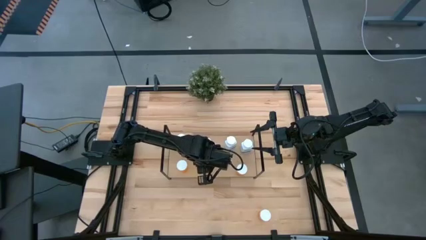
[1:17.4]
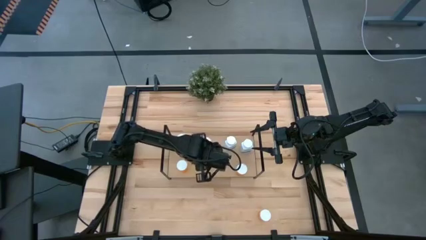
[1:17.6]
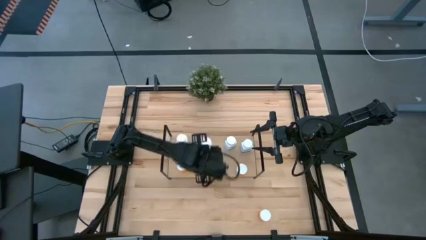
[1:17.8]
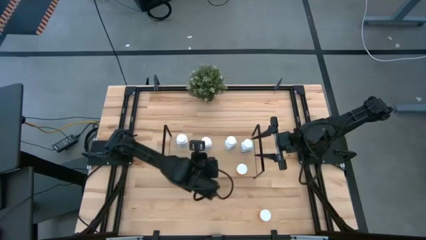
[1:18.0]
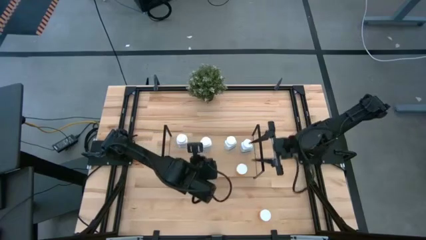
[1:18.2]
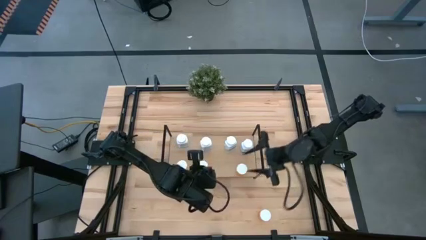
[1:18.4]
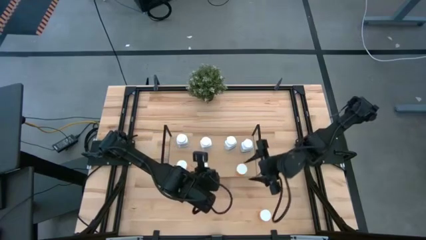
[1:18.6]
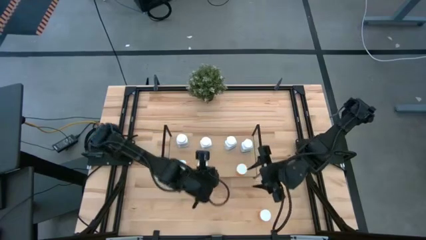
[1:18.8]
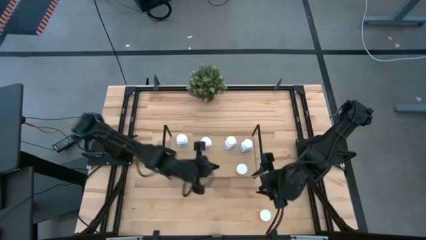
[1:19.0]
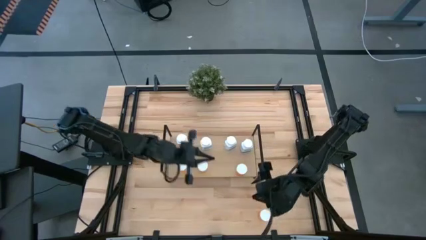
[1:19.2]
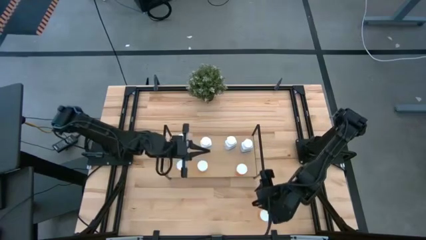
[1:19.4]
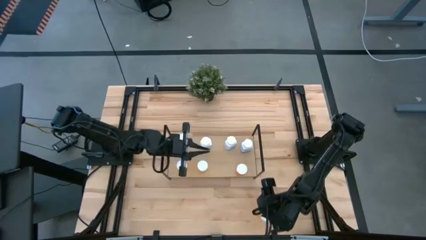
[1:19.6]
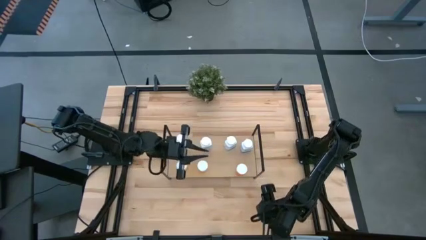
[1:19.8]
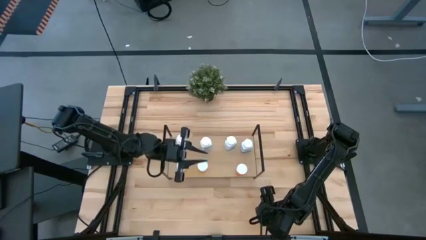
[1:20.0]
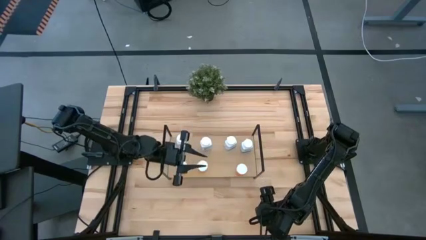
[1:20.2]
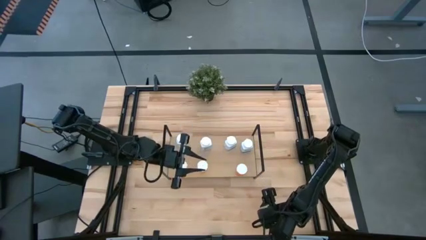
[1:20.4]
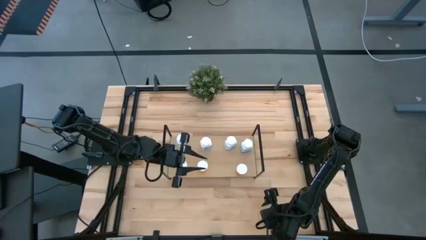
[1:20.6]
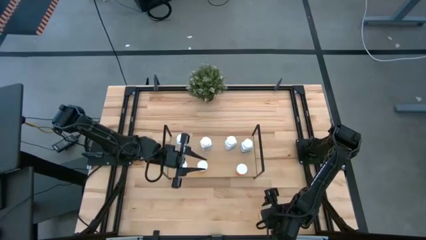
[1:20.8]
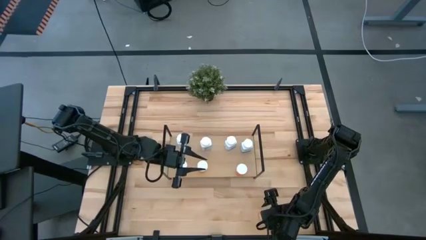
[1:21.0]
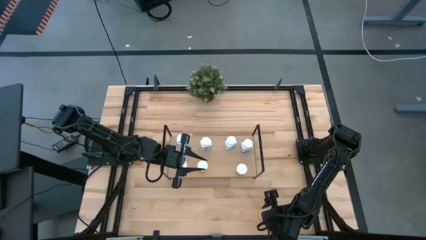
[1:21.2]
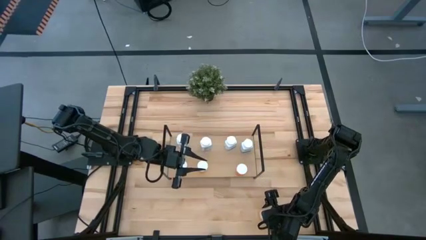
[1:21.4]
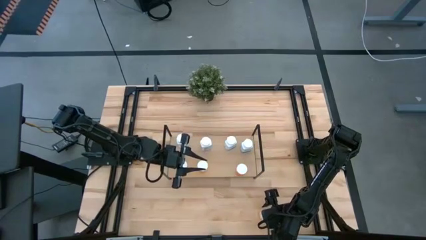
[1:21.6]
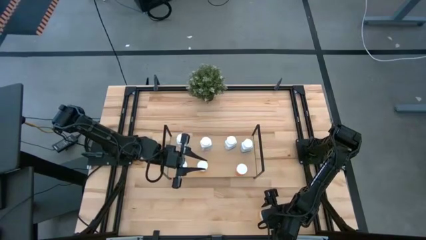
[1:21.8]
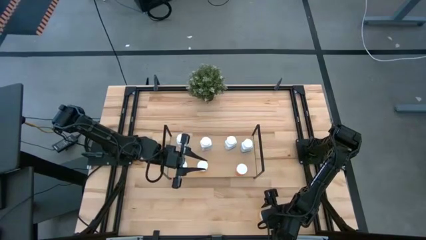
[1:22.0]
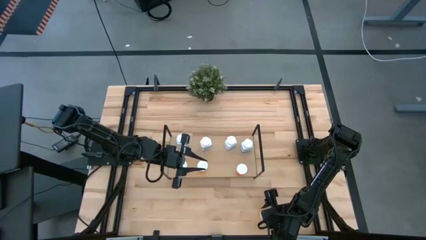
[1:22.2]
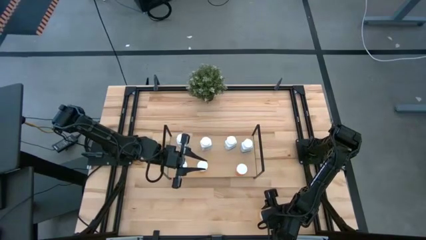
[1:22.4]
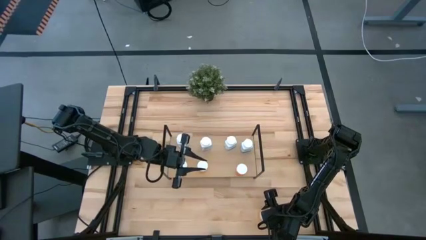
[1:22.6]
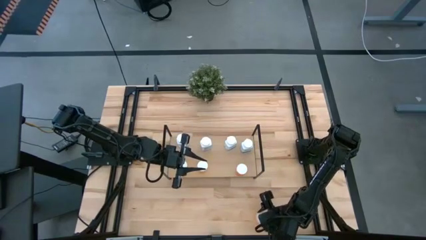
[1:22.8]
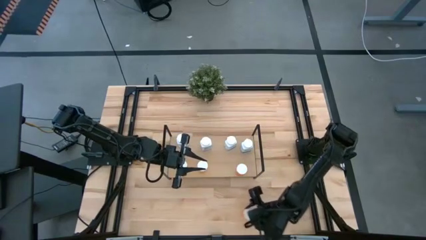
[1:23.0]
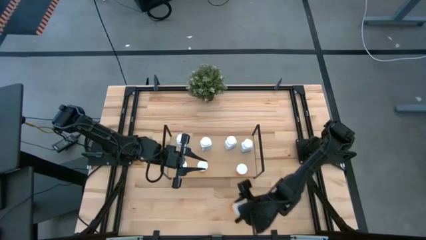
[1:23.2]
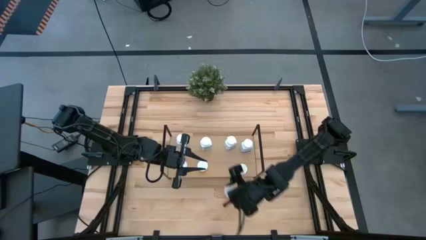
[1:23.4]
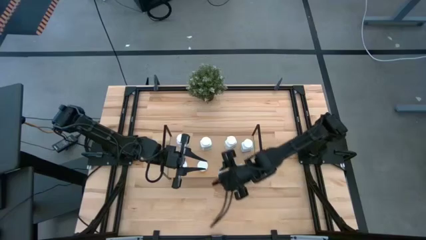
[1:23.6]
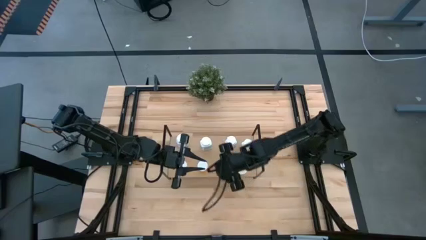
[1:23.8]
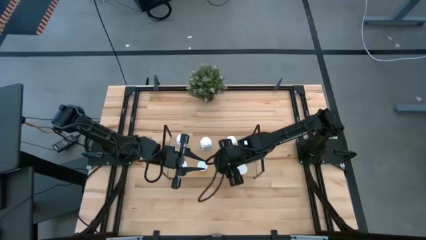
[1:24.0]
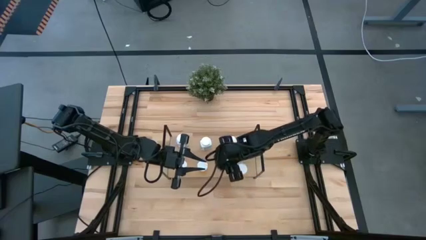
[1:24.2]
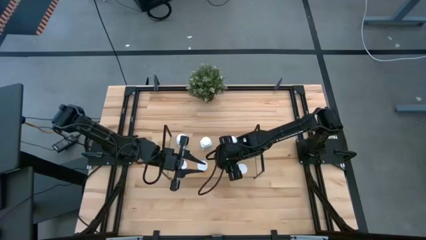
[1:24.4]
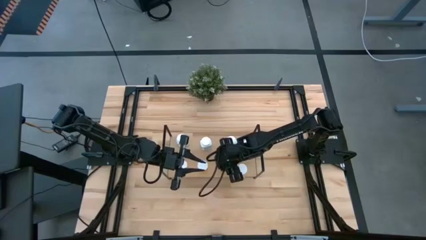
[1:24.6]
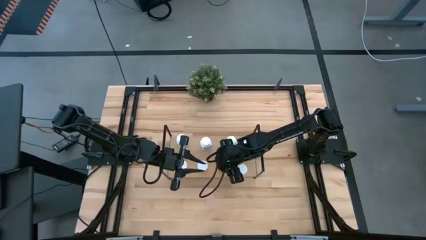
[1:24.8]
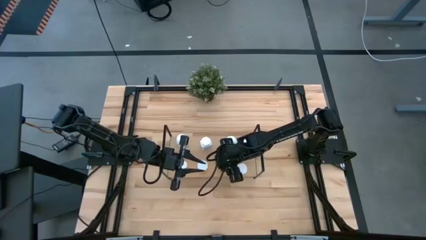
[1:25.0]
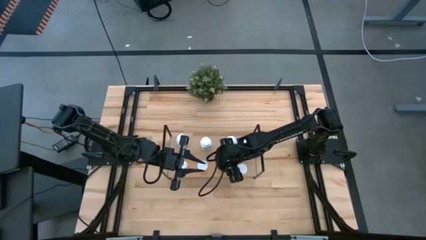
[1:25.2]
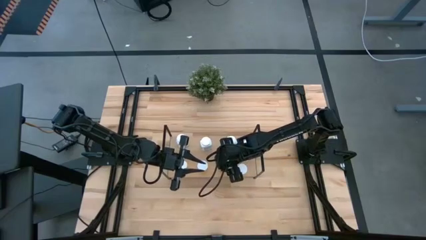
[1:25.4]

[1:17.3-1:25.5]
Task: Pick and place medicine bottles onto shelf by color
Put the orange pill bottle on the shelf

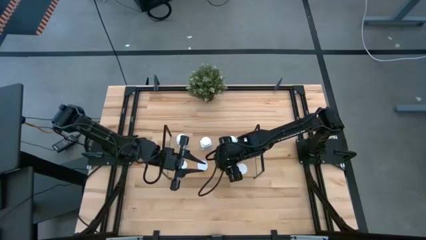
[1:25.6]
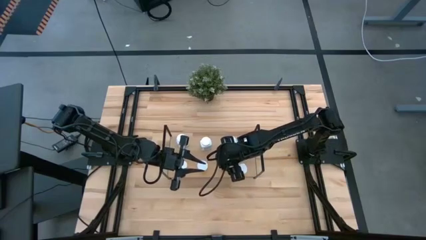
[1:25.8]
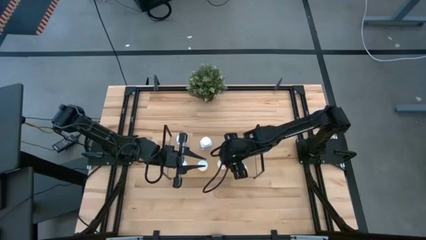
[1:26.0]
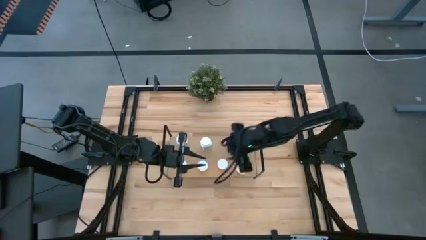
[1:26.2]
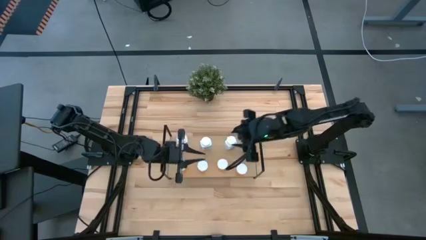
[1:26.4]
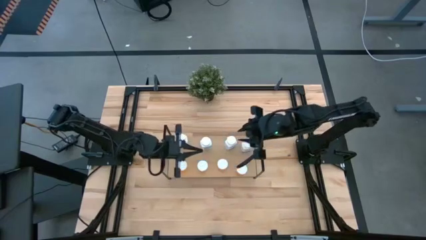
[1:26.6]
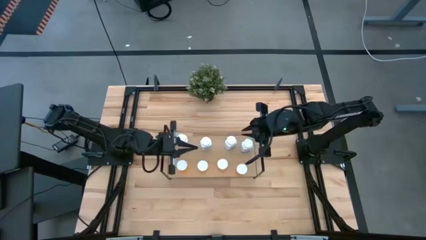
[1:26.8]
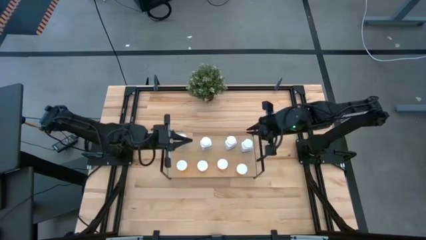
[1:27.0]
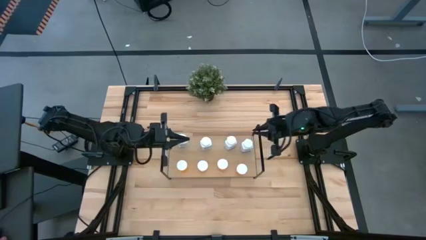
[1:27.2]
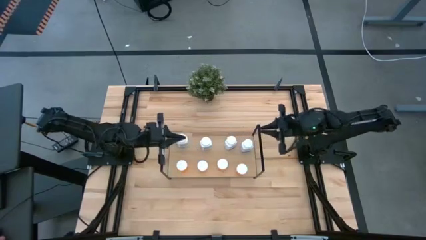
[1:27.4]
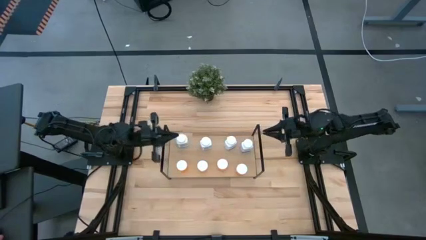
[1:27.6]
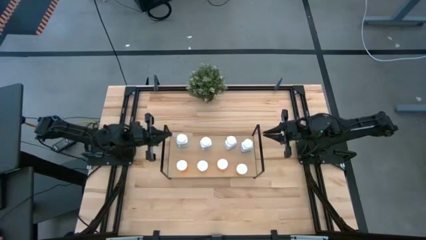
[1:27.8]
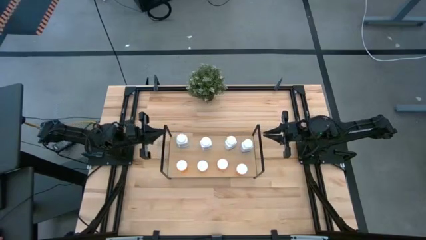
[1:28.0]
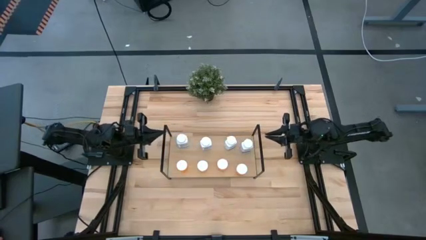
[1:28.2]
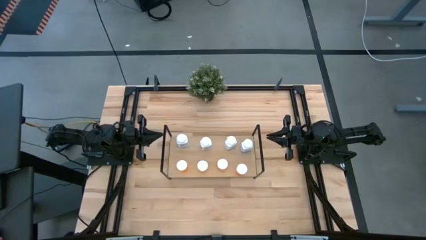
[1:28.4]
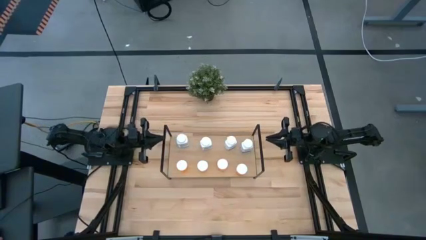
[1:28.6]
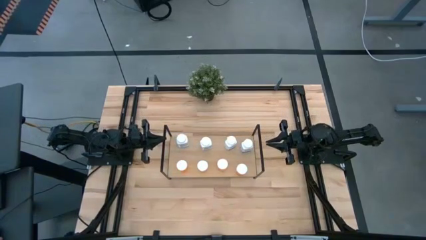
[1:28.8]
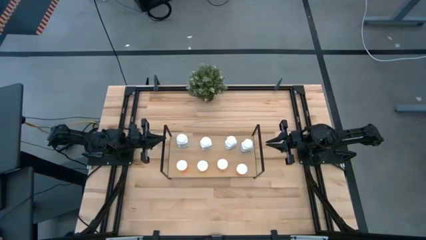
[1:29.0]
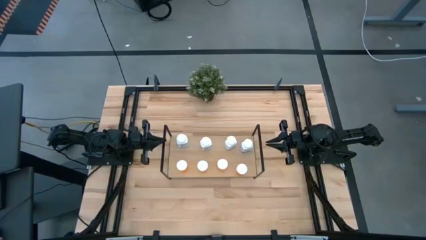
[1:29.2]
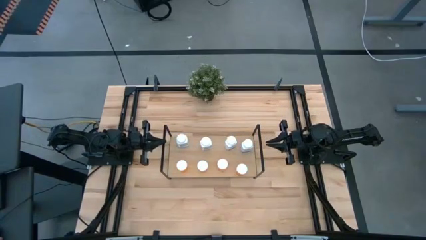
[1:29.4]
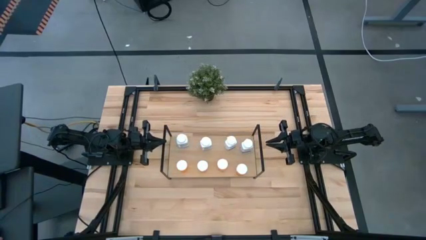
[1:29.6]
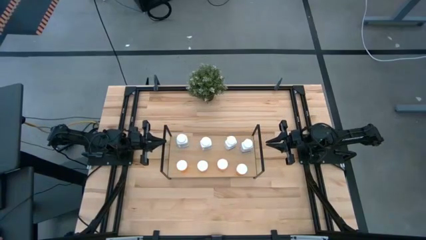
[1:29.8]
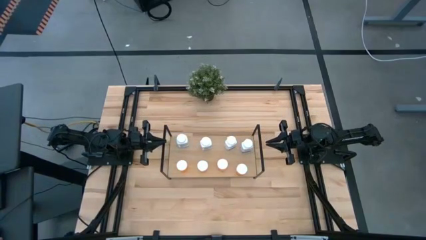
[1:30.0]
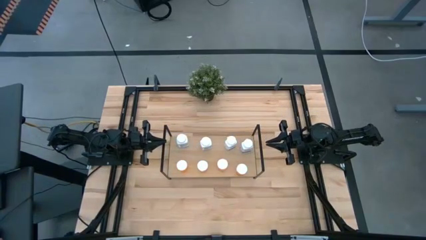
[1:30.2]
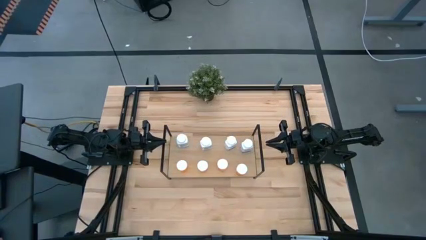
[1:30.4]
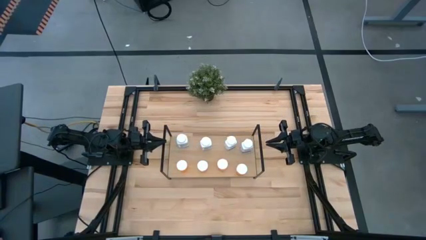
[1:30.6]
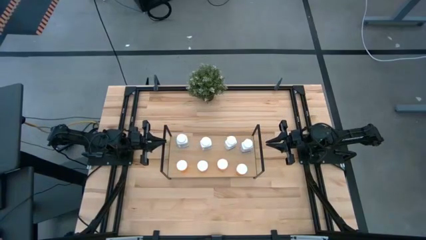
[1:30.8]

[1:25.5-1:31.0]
Return to Home Position
